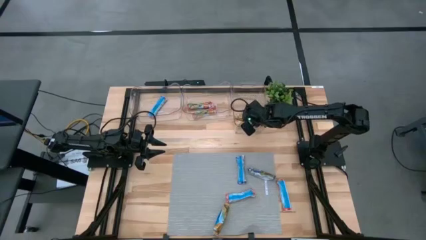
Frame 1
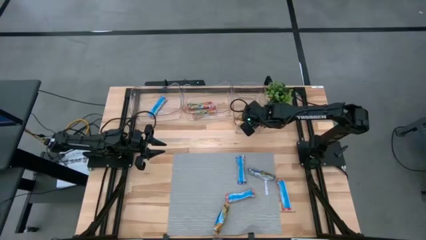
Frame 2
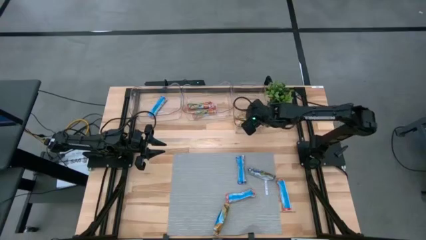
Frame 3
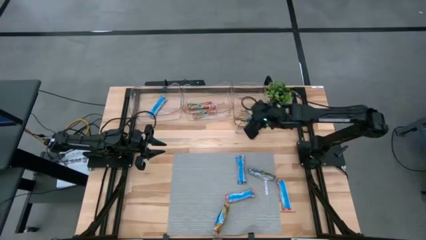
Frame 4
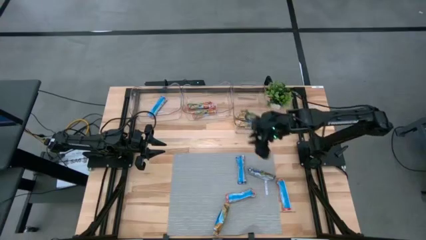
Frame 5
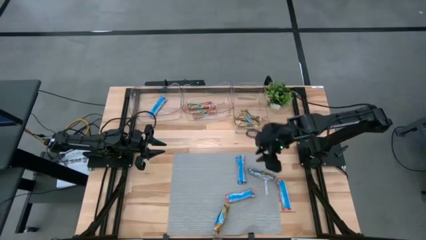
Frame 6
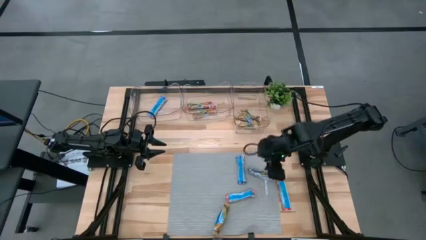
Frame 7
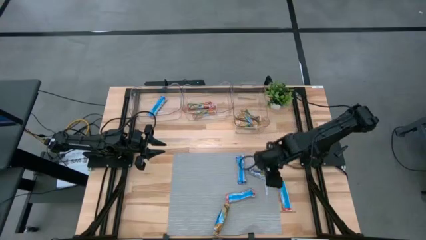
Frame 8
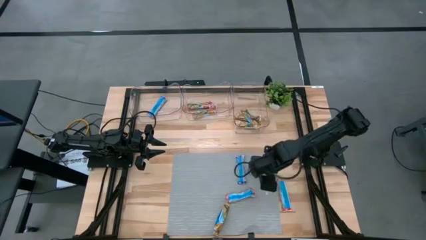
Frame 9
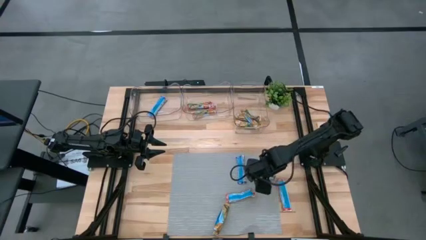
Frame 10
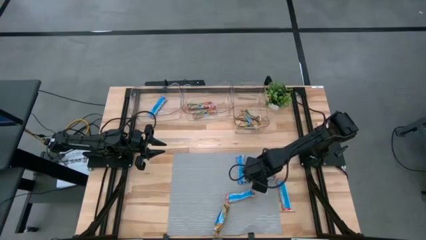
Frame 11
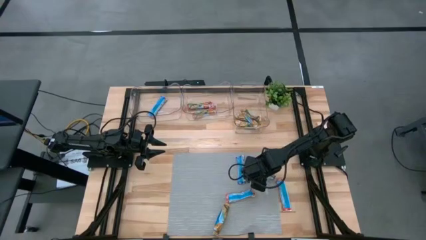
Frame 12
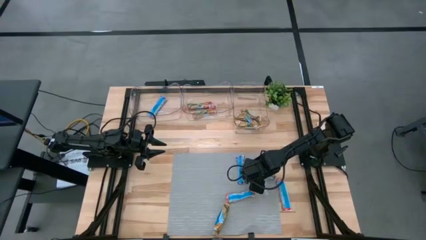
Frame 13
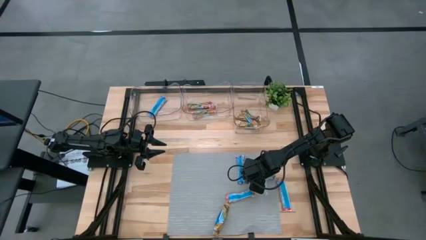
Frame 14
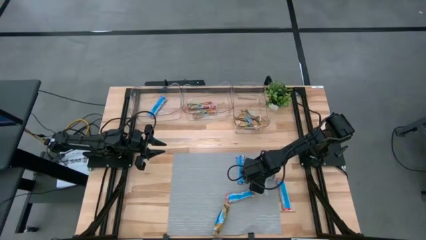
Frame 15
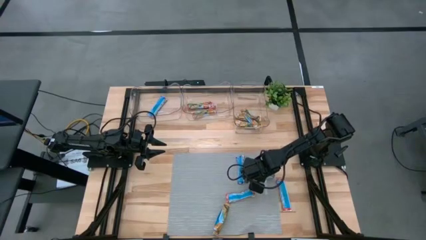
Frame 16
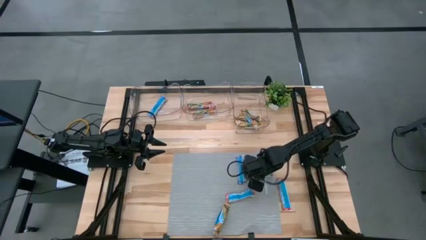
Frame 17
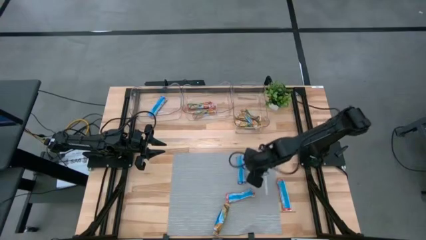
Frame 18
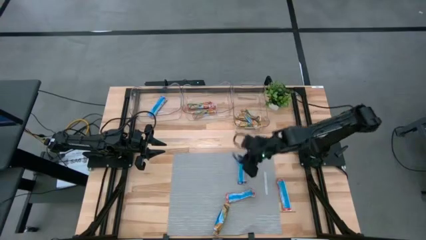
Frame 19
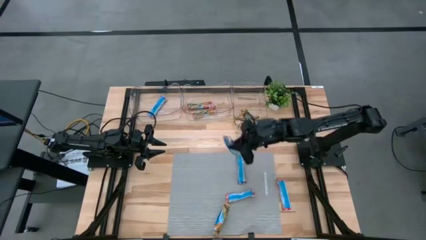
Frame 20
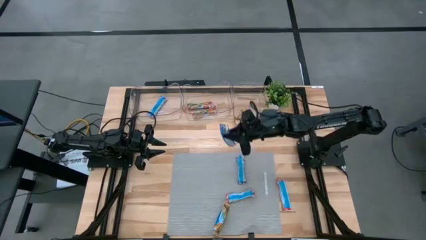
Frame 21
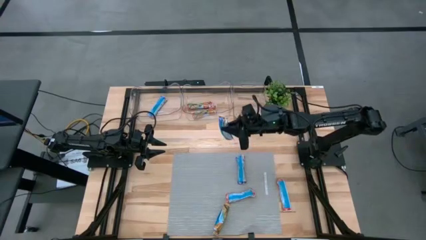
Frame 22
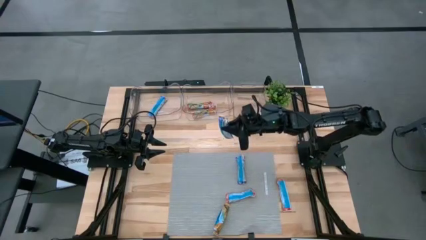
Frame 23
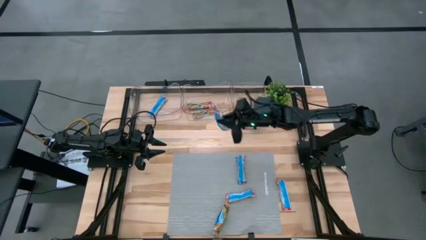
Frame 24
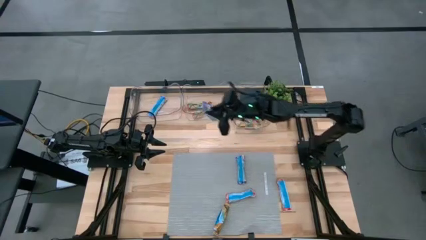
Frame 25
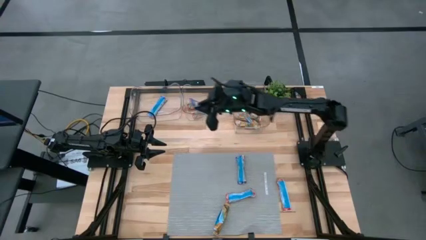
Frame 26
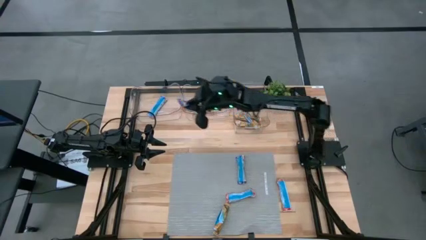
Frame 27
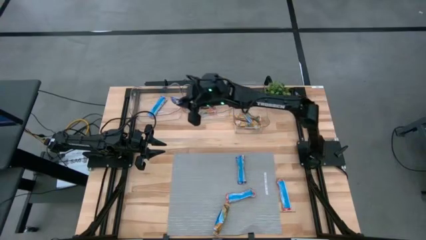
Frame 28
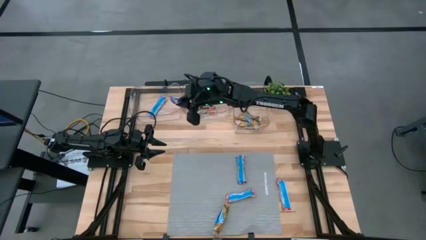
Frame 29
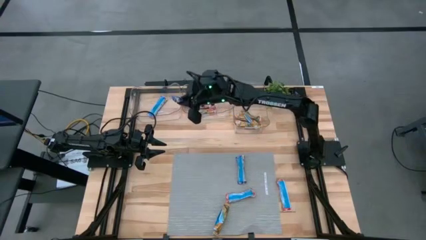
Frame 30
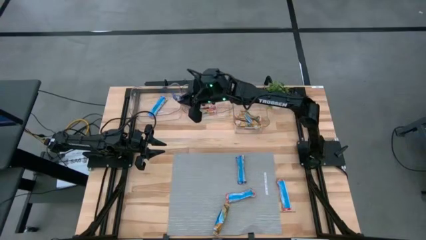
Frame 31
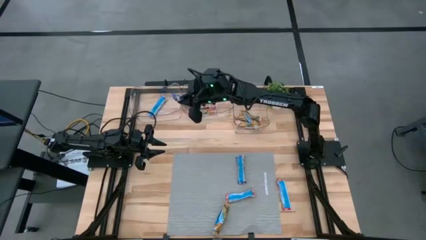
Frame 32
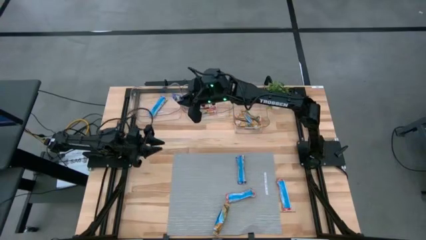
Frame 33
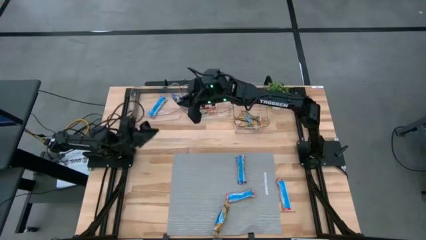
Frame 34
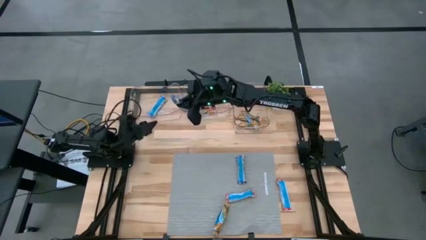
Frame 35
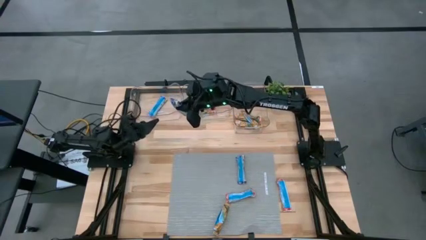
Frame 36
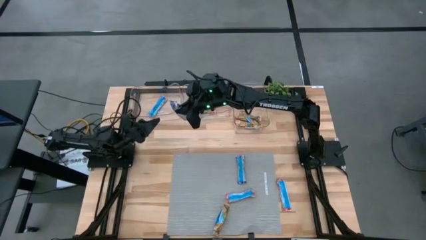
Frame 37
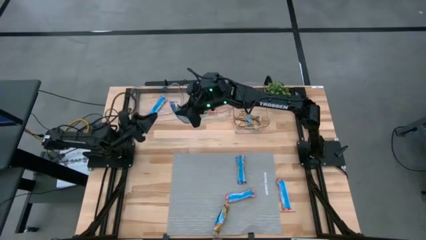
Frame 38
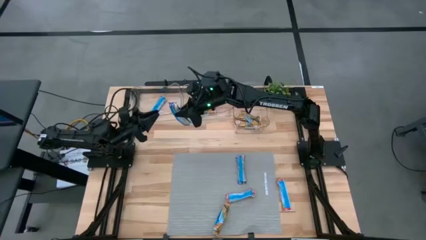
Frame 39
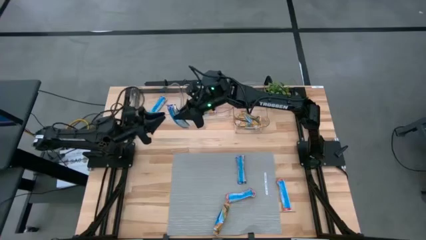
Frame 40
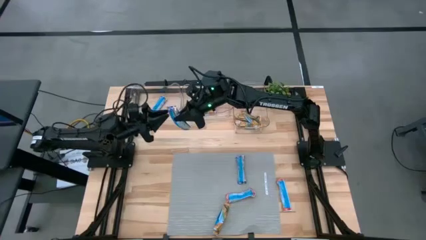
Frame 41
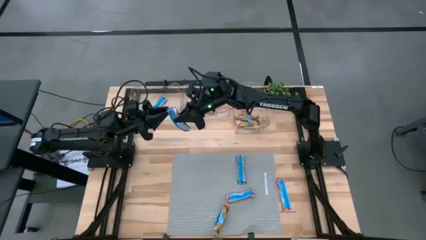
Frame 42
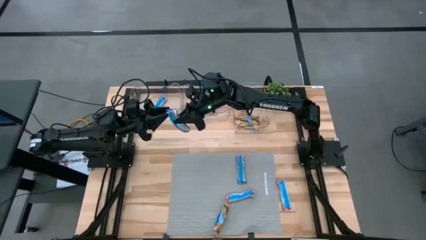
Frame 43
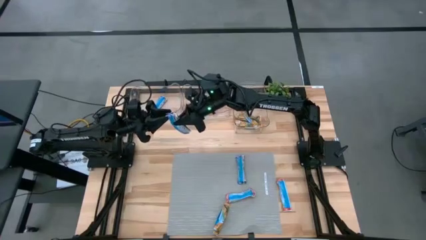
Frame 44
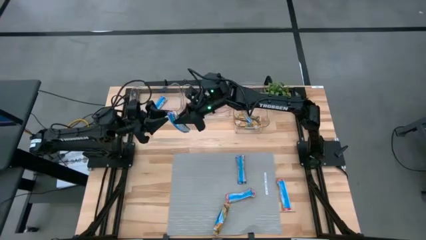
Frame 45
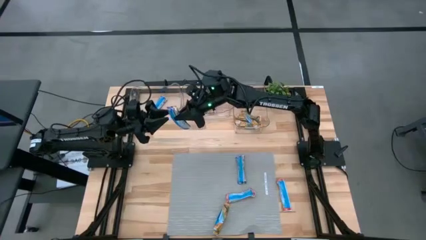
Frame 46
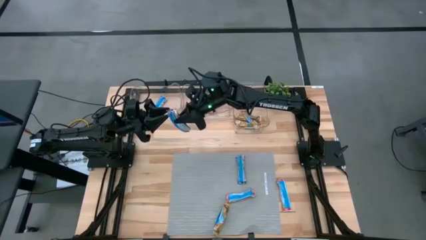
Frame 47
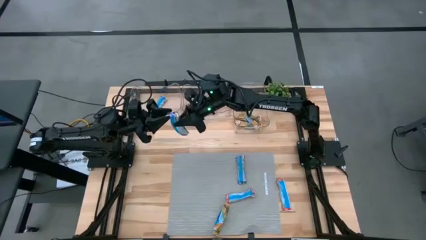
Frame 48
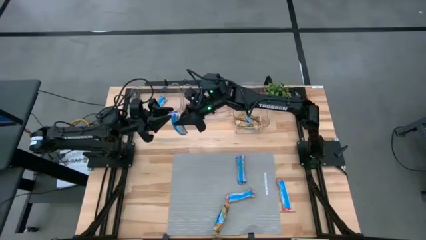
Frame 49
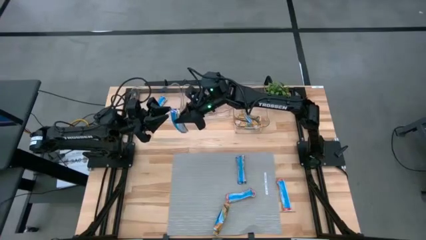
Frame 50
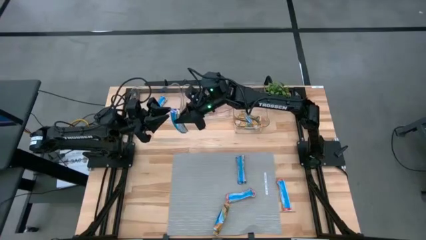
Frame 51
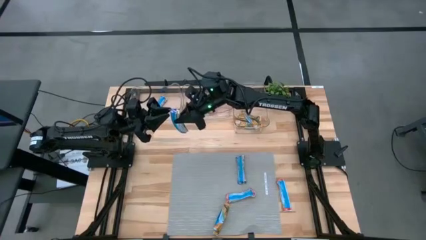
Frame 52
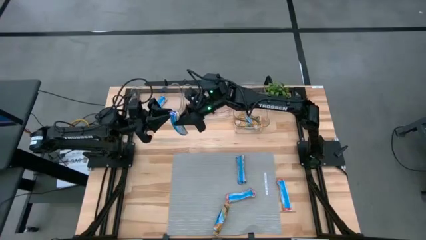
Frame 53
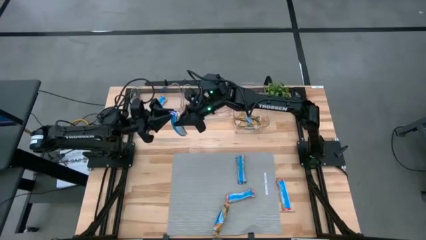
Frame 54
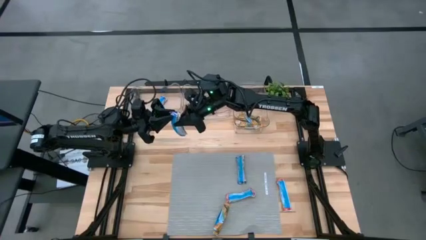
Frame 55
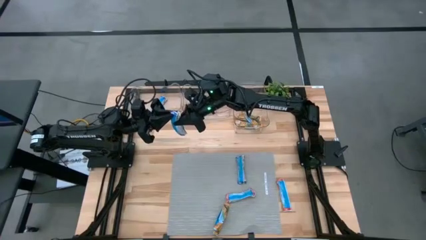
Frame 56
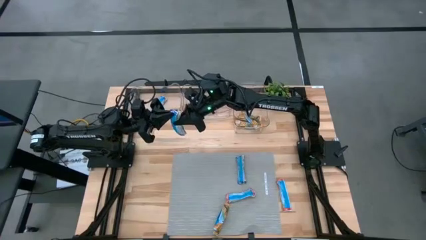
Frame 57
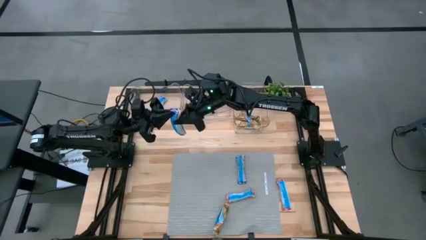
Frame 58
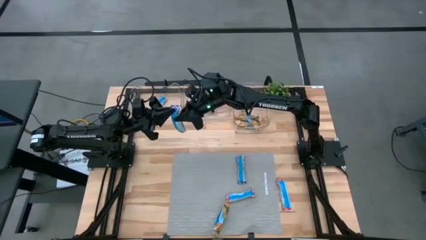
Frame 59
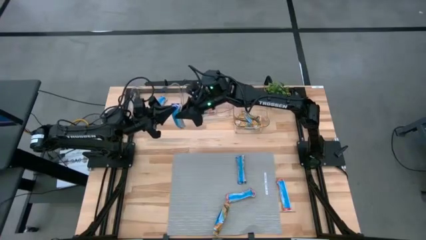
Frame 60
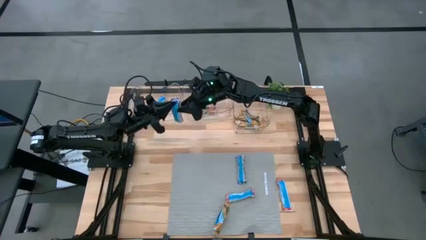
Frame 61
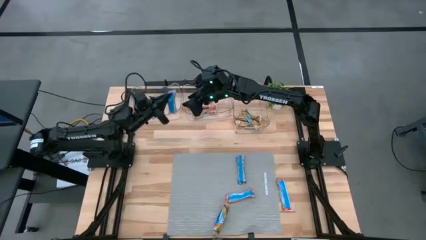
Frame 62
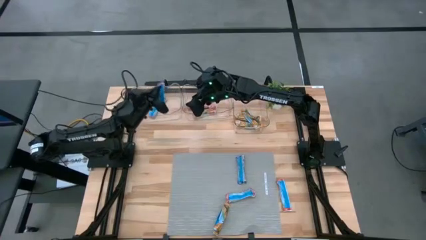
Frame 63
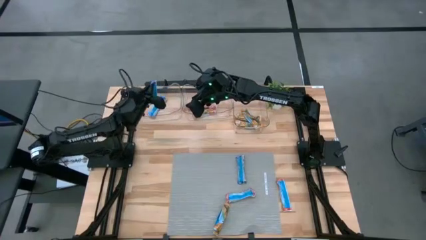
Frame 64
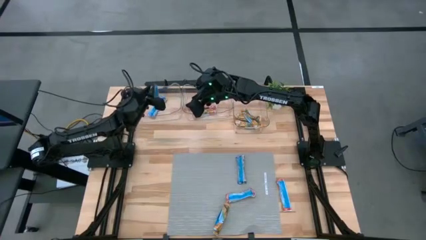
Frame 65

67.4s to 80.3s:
Task: Pick and place Granola Bars by type
Put the blue granola bar into the left transparent bin

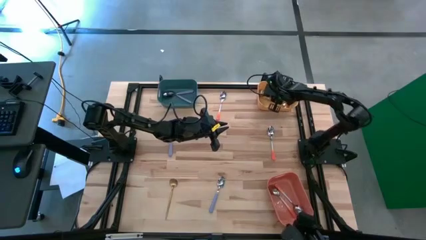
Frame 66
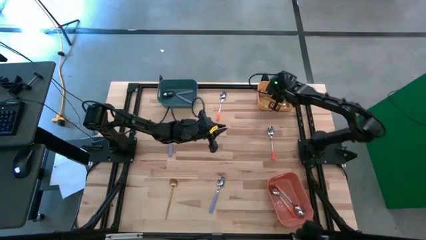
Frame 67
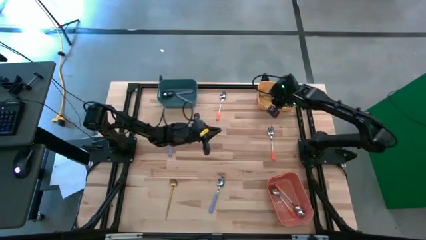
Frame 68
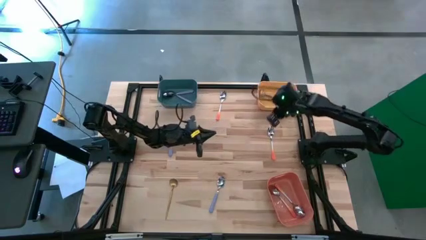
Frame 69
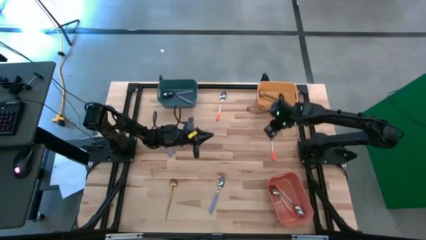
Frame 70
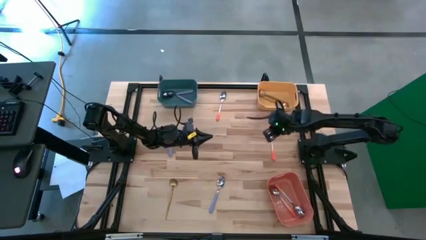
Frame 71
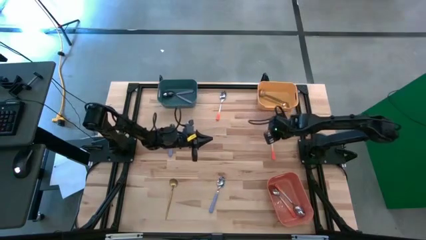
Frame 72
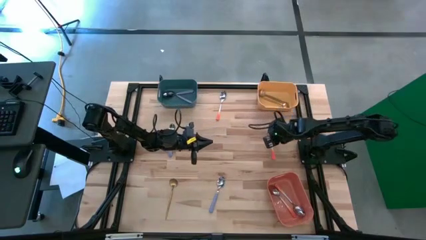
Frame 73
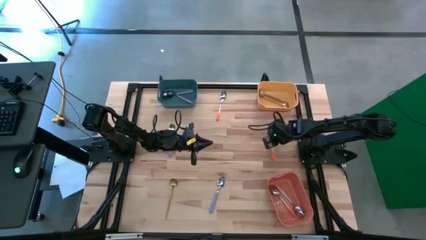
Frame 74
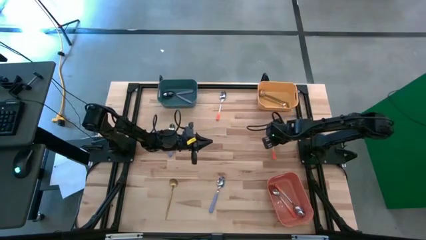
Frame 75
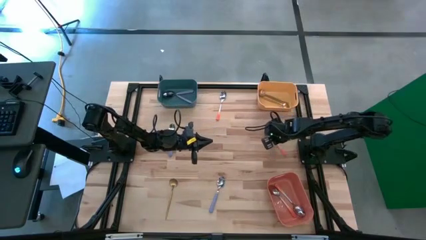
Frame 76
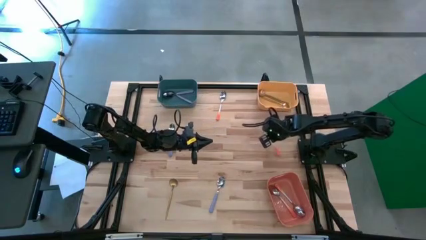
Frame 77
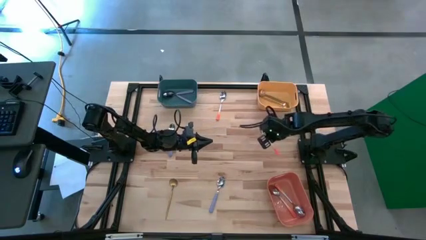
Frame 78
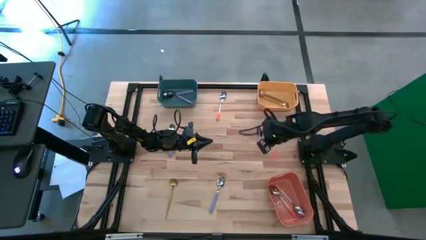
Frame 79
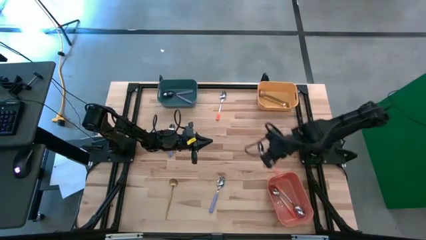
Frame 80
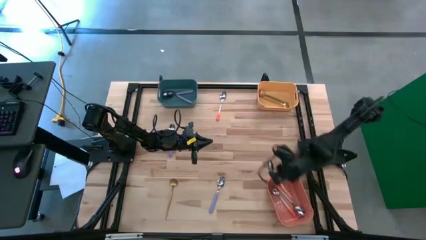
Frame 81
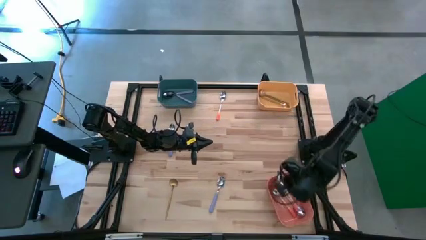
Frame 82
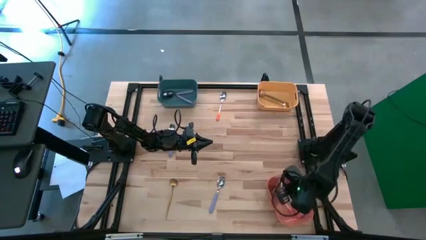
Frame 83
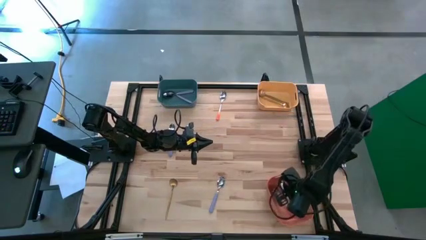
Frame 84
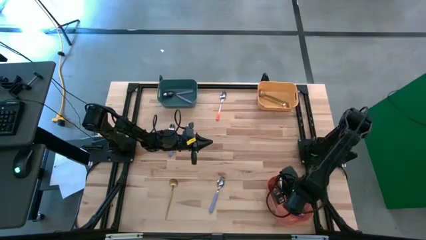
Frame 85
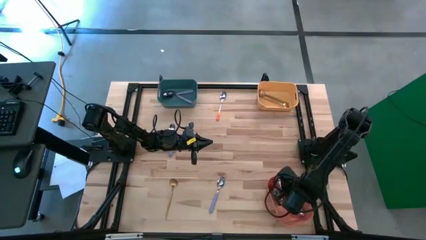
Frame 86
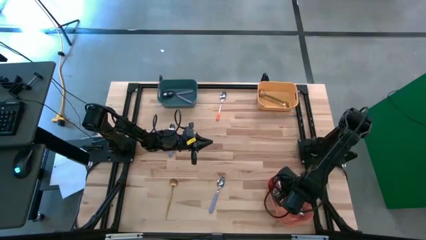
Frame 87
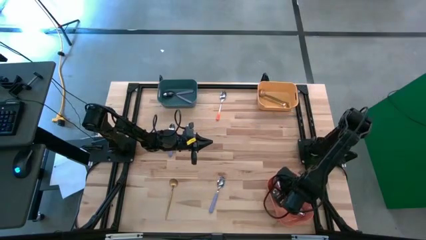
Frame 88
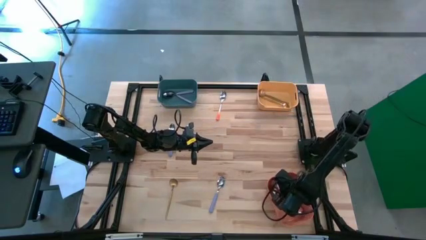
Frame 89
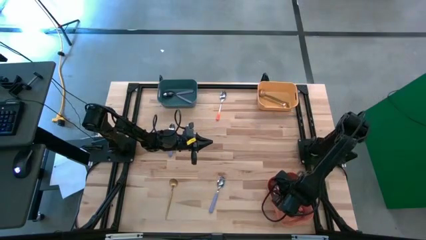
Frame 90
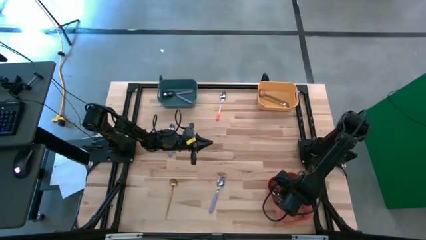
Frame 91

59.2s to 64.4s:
Task: Sort silverware by color (type)
Put the right orange spoon into the orange bin
